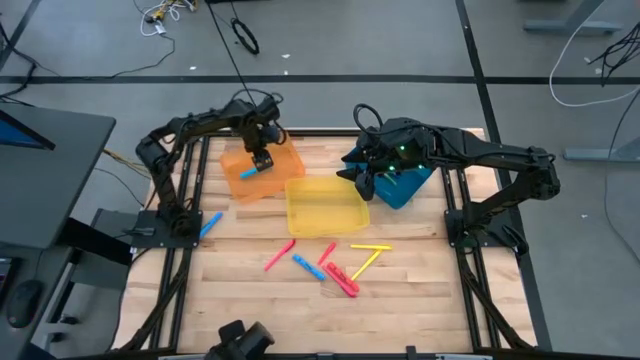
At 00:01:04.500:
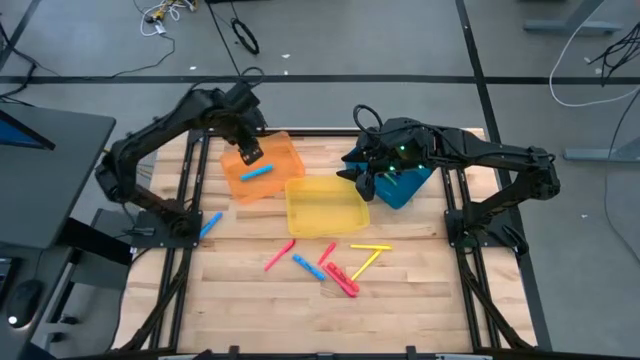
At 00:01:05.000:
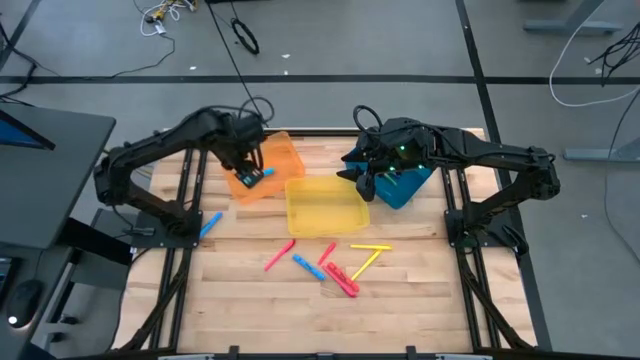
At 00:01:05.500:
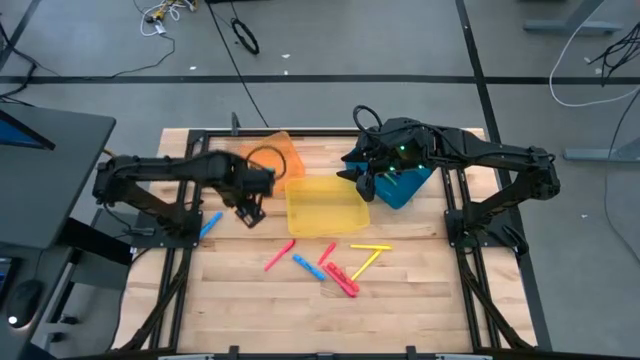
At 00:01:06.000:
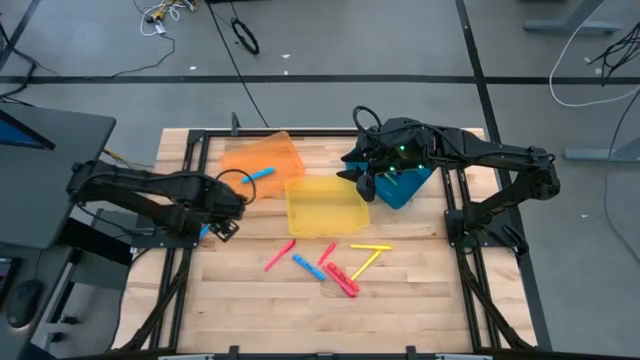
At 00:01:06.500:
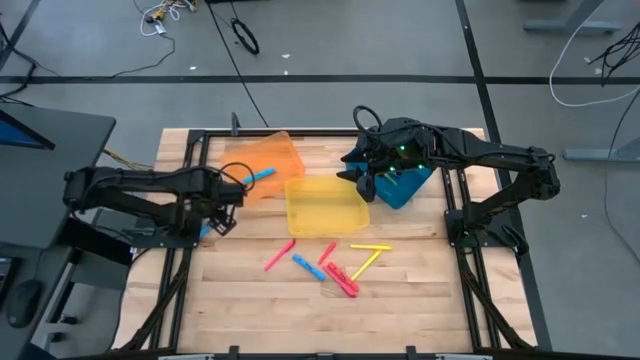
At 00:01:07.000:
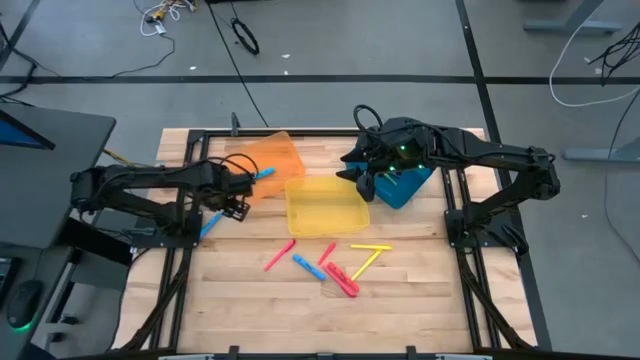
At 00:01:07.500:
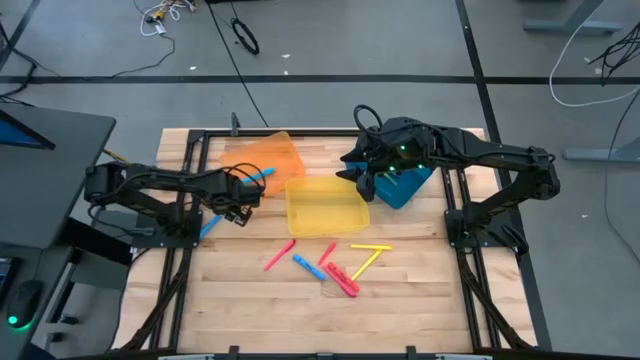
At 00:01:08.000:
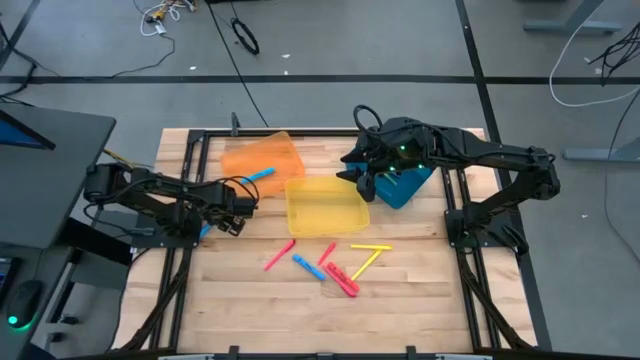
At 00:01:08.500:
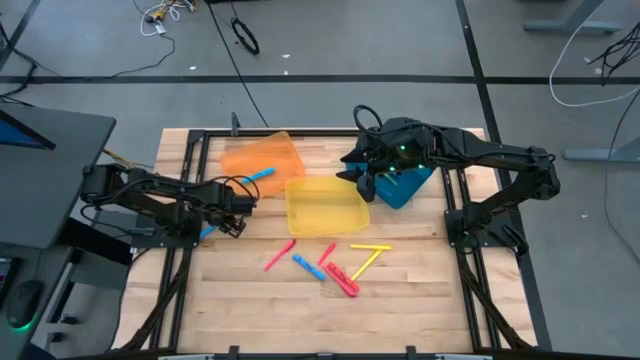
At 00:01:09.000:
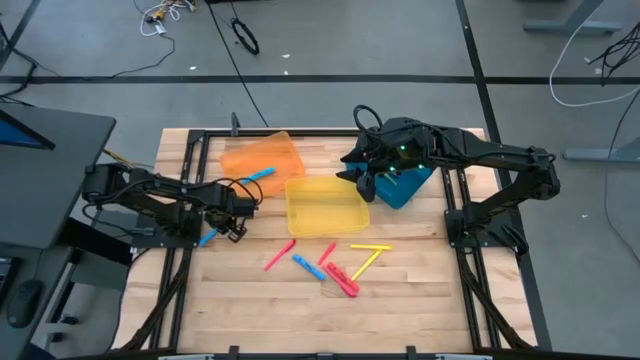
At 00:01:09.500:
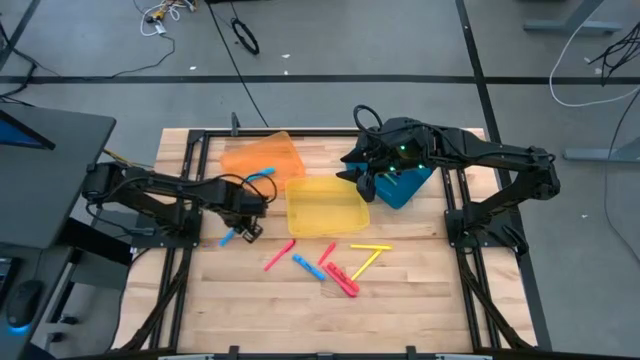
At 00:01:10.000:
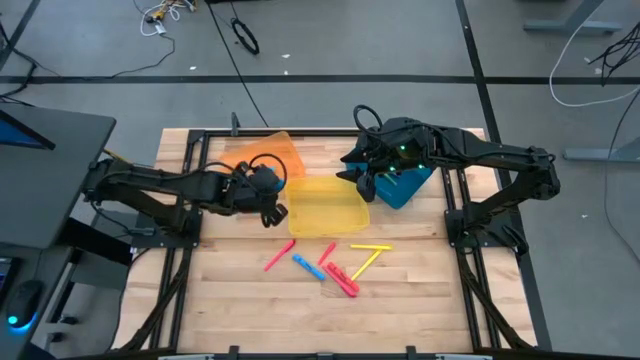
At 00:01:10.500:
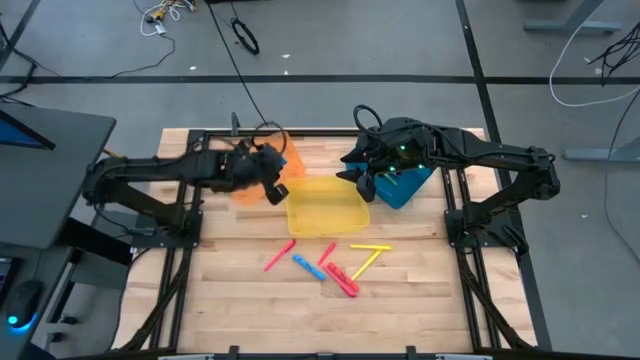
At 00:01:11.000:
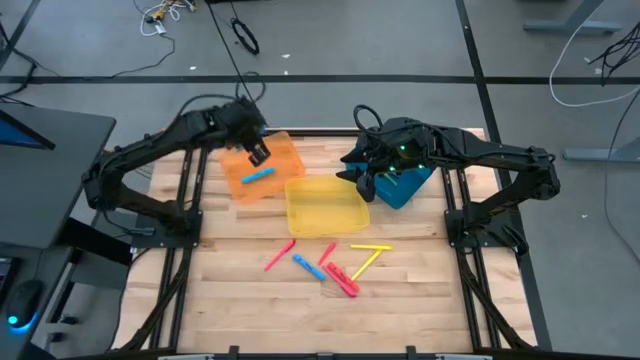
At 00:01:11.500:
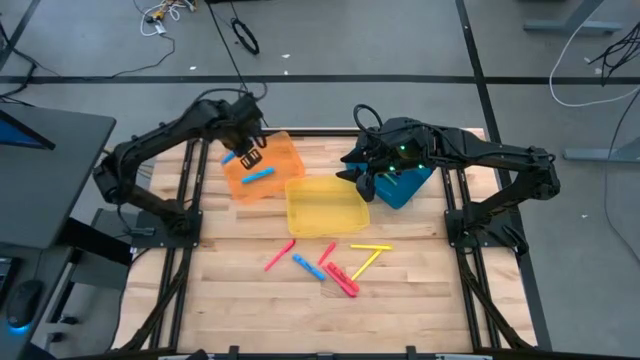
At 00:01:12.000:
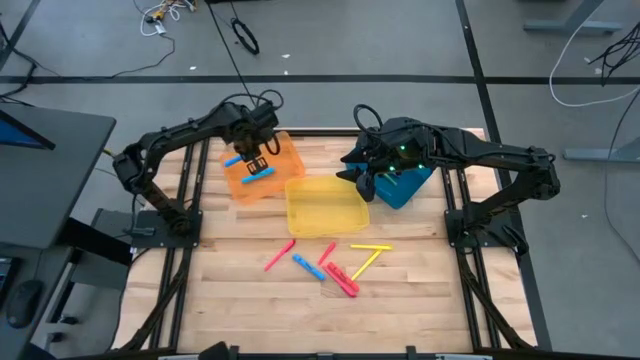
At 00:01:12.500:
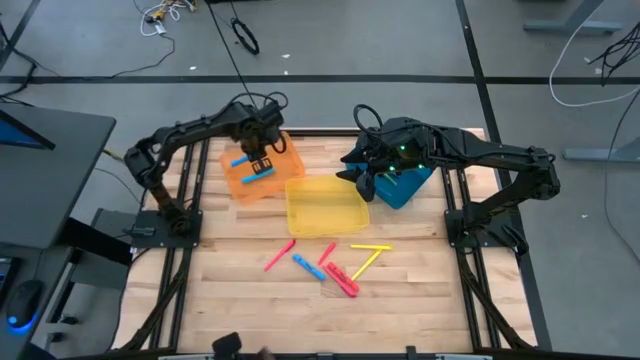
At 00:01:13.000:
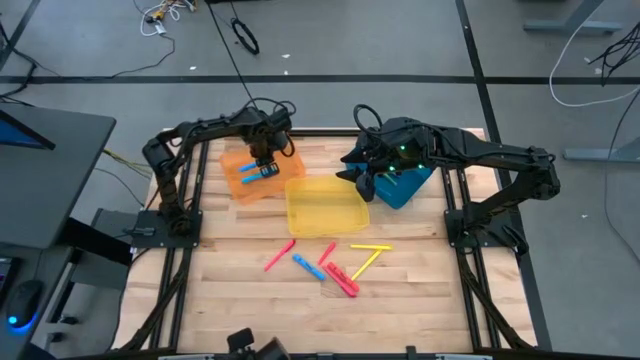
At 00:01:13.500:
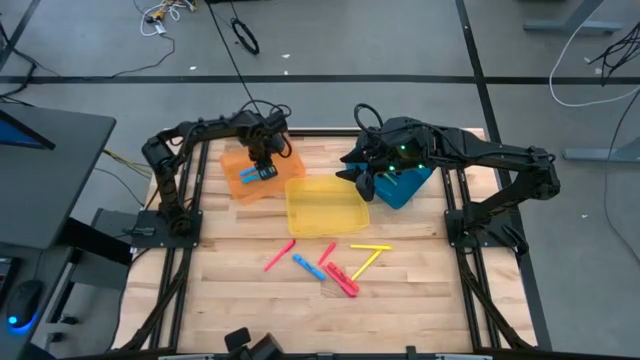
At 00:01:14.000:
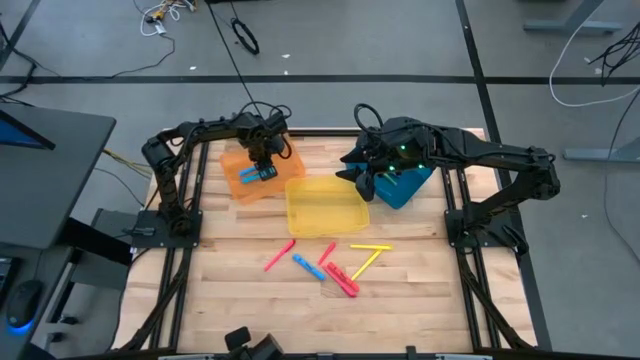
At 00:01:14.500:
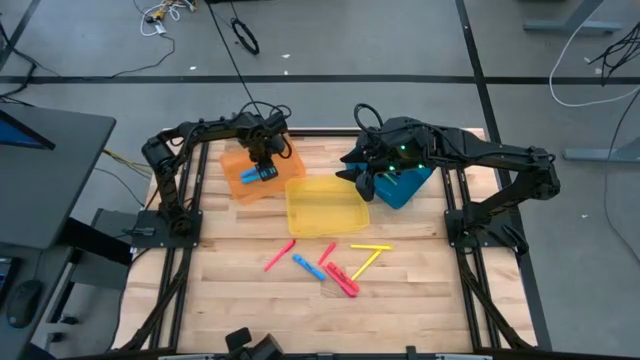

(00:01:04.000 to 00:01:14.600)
Task: Pick & Place Markers
Put the top blue highlighter pen into the orange bin

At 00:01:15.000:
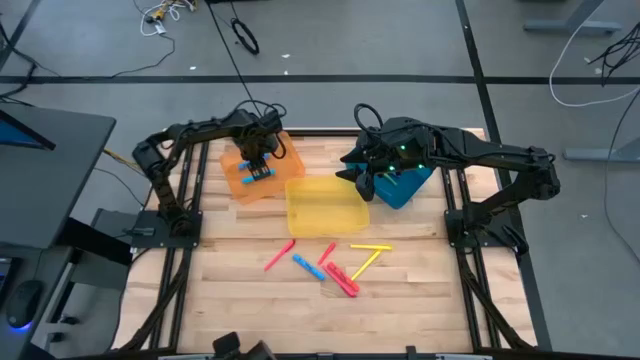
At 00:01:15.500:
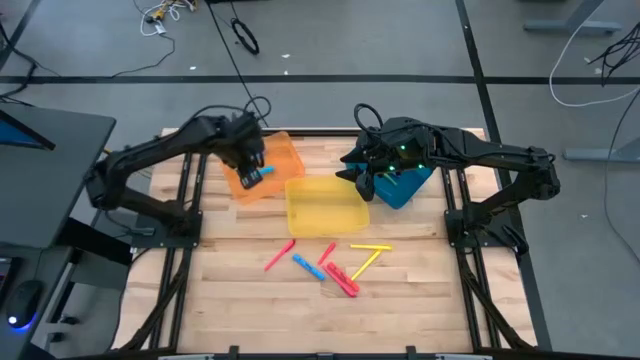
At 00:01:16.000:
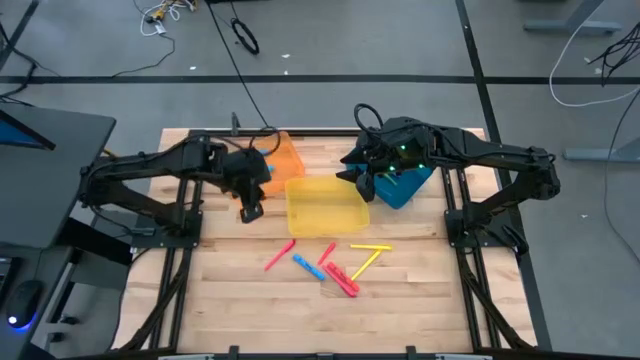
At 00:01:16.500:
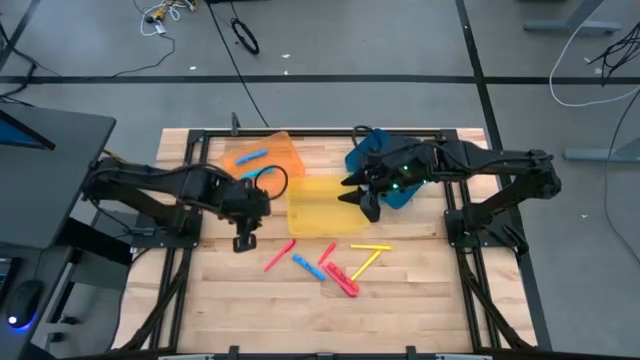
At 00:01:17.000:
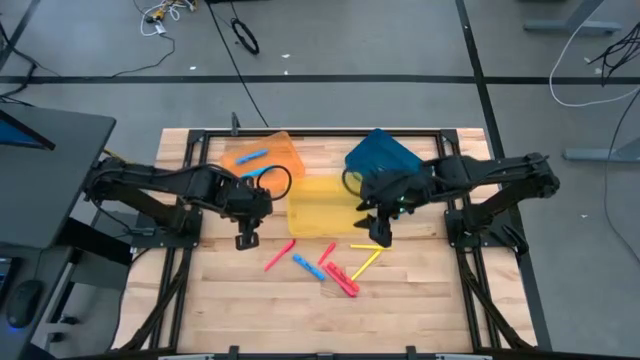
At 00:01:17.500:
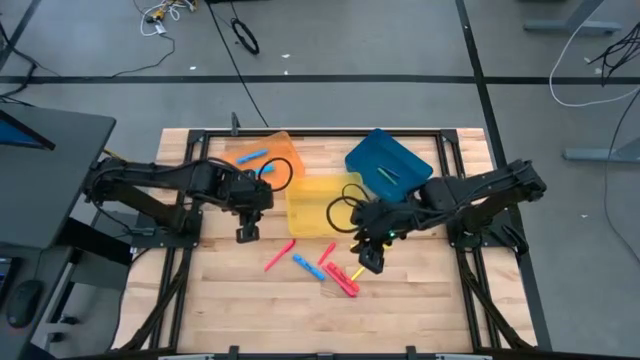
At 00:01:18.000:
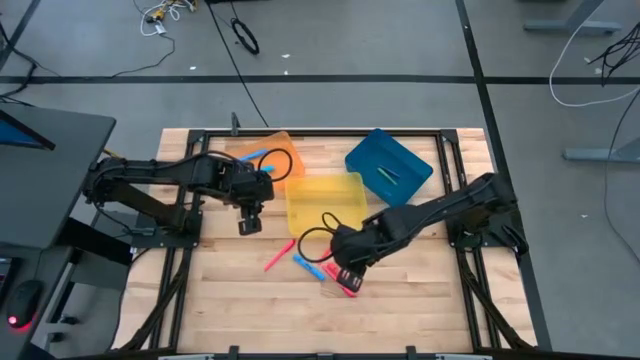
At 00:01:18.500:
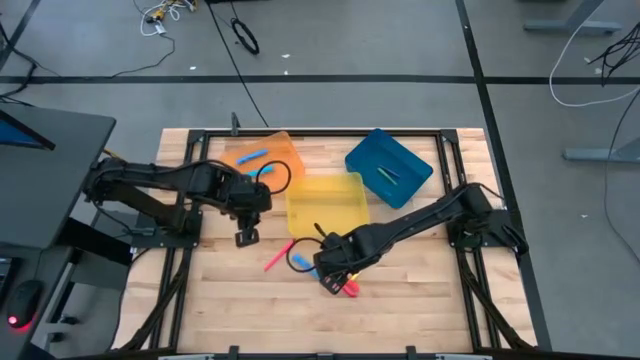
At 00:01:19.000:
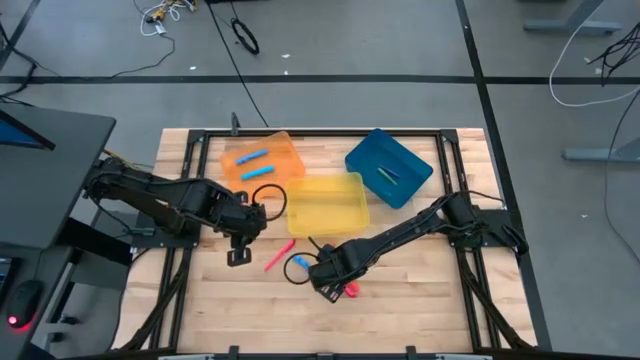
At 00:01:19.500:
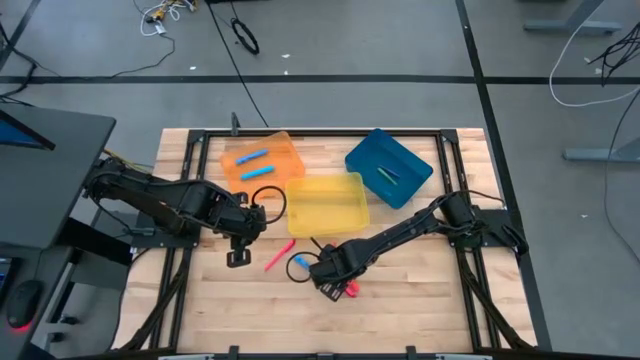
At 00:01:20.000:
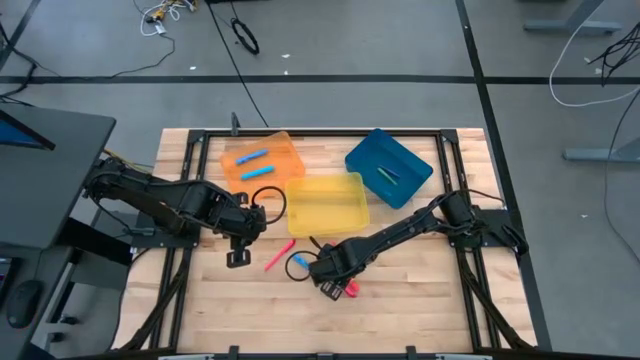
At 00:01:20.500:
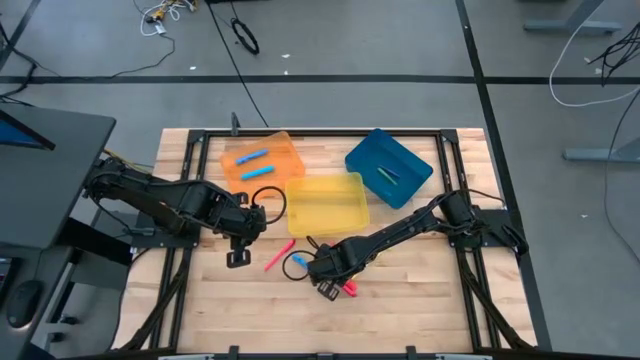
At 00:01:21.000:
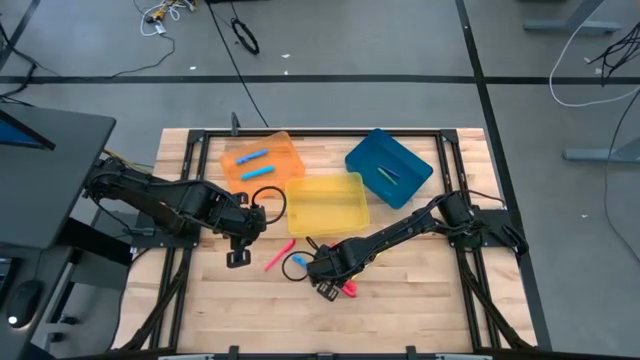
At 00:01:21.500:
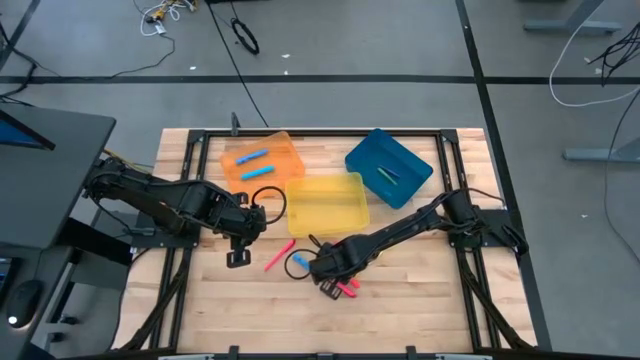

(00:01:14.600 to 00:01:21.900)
Put the orange highlighter pen into the orange bin
